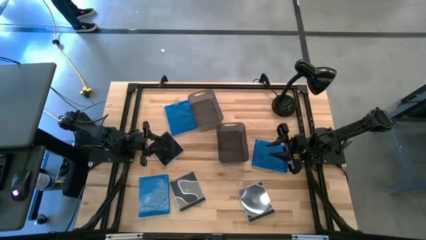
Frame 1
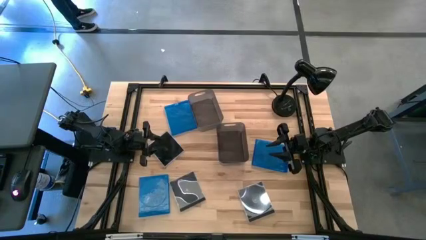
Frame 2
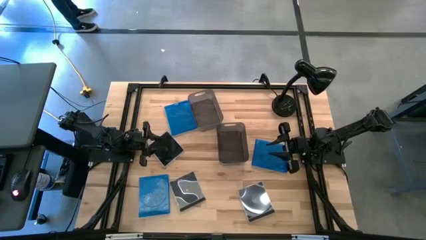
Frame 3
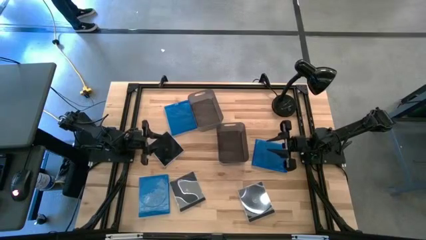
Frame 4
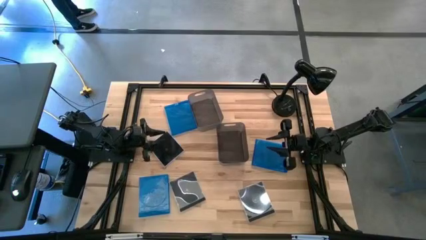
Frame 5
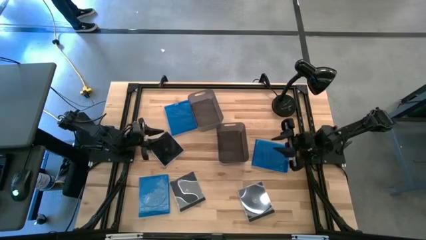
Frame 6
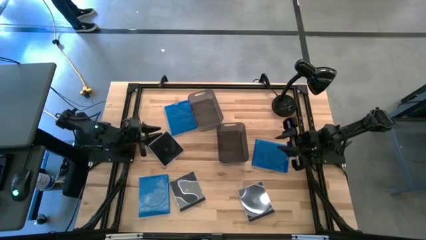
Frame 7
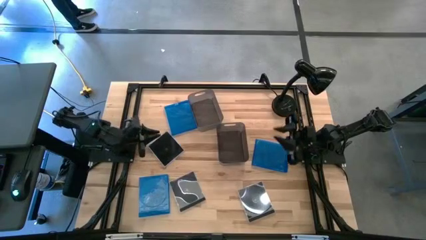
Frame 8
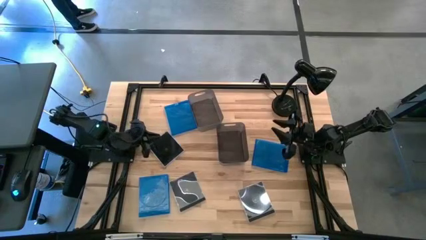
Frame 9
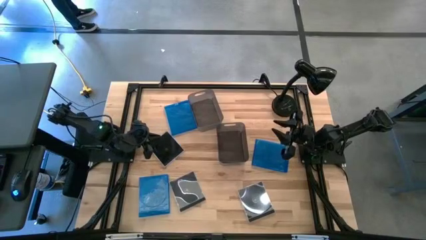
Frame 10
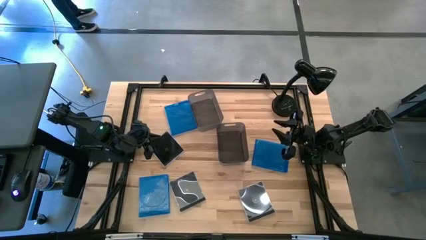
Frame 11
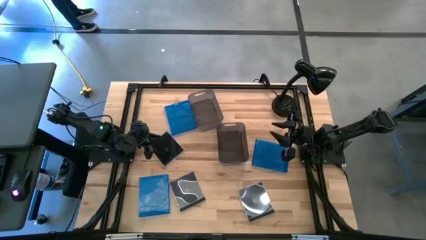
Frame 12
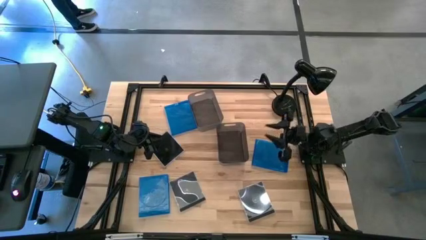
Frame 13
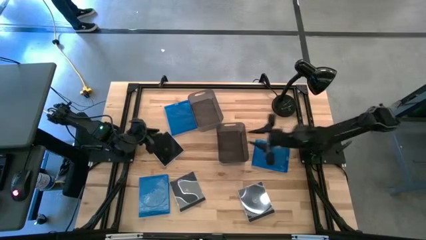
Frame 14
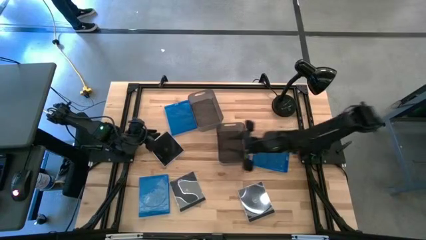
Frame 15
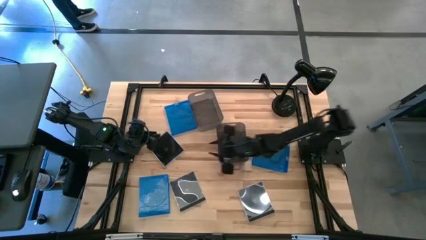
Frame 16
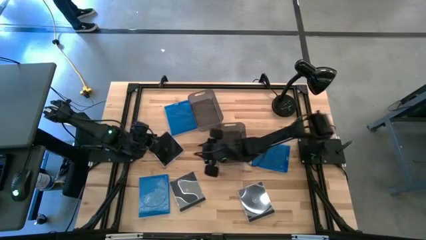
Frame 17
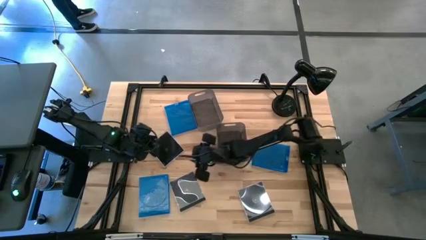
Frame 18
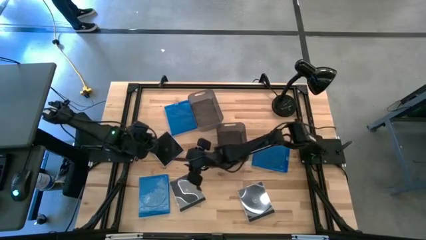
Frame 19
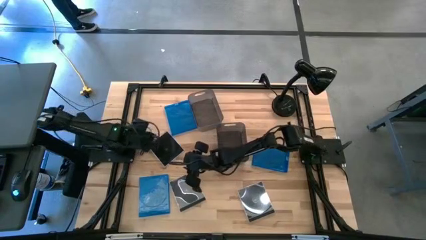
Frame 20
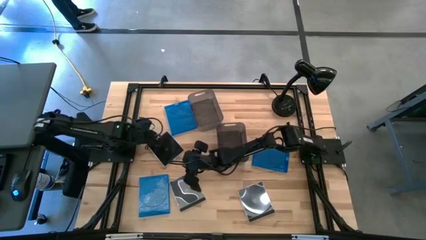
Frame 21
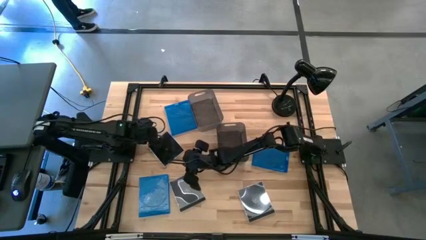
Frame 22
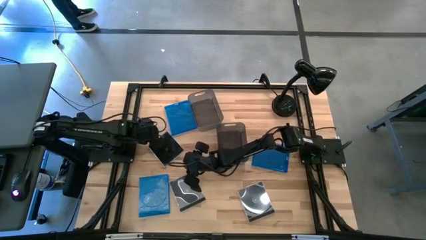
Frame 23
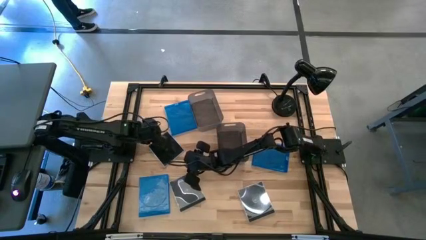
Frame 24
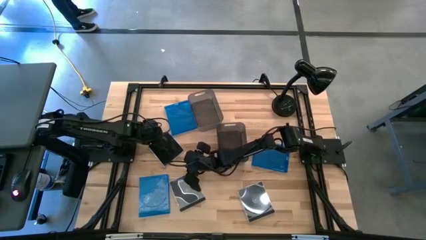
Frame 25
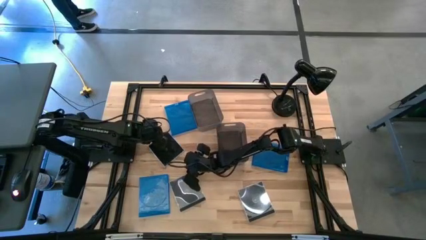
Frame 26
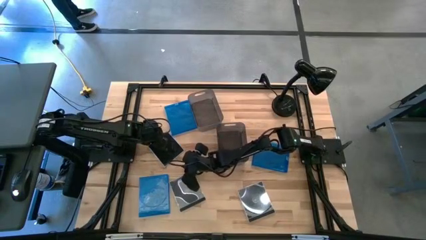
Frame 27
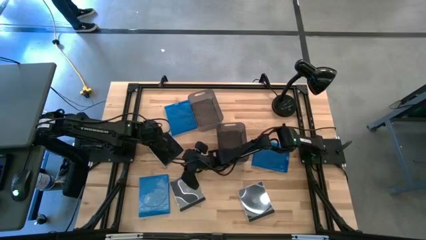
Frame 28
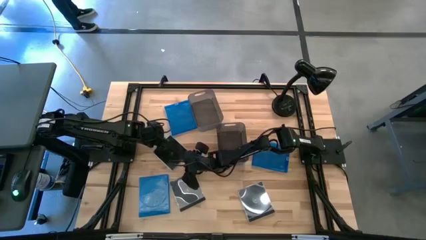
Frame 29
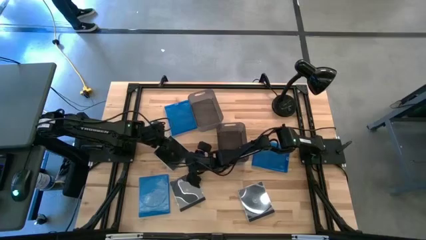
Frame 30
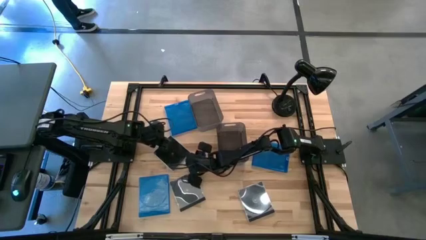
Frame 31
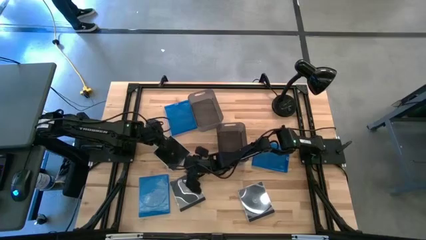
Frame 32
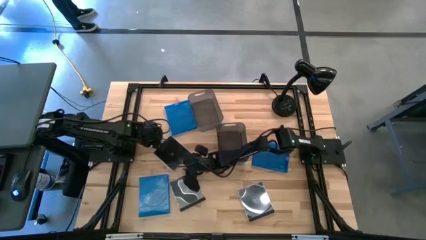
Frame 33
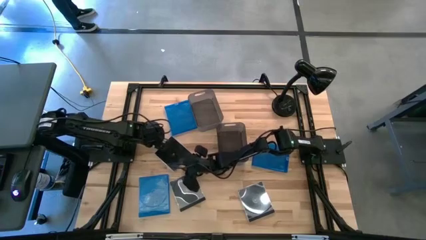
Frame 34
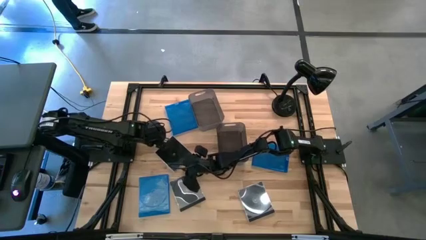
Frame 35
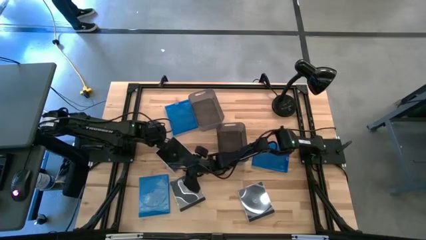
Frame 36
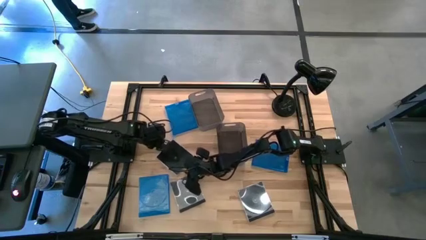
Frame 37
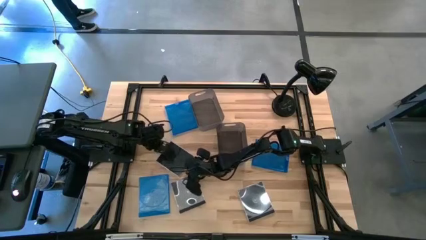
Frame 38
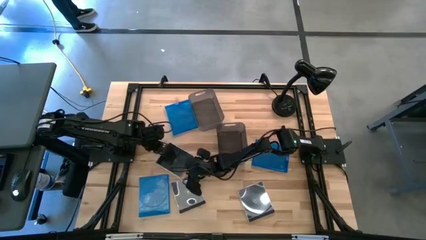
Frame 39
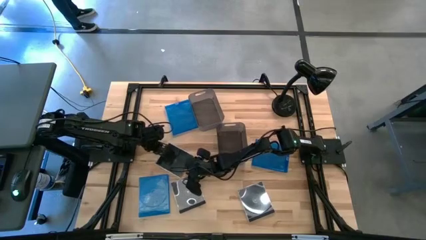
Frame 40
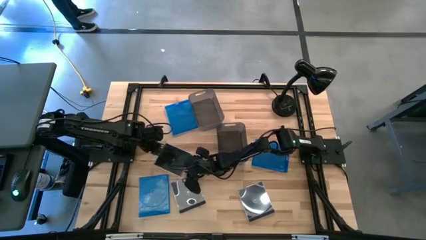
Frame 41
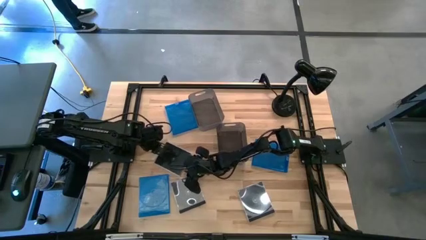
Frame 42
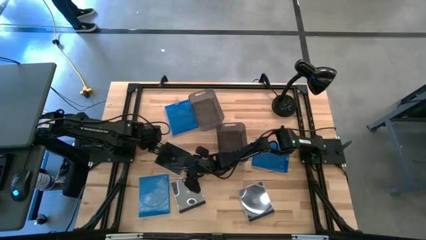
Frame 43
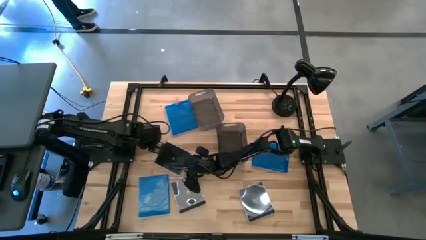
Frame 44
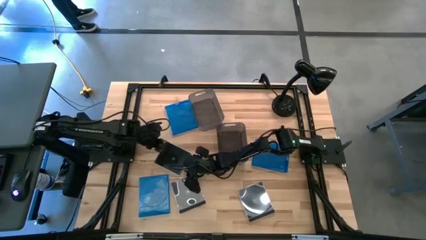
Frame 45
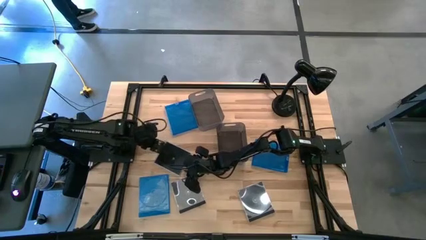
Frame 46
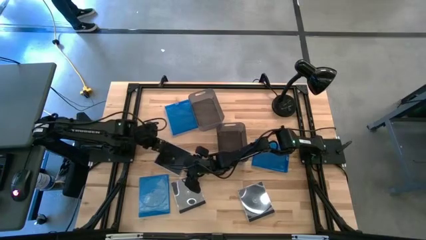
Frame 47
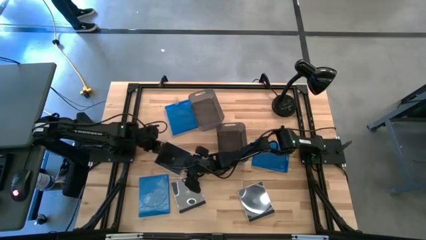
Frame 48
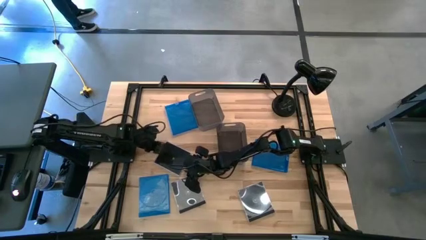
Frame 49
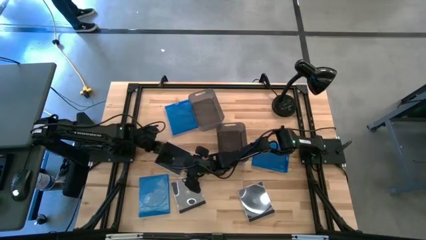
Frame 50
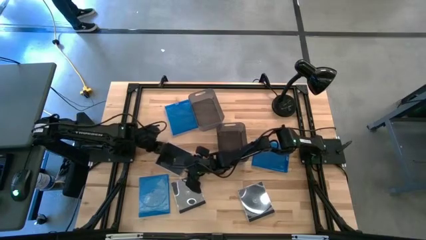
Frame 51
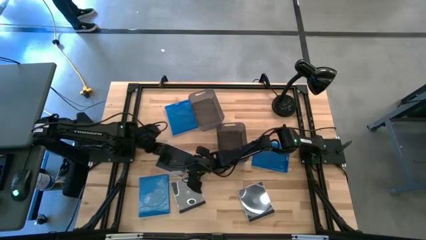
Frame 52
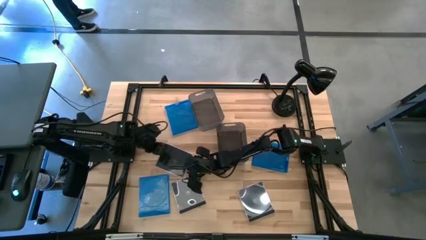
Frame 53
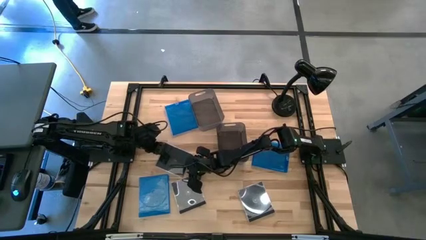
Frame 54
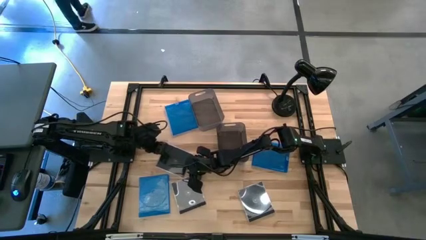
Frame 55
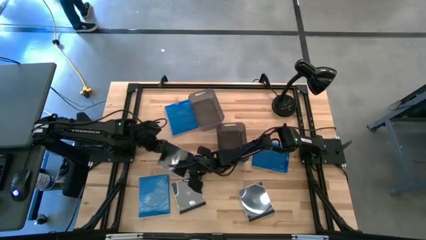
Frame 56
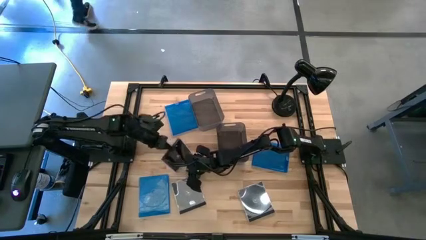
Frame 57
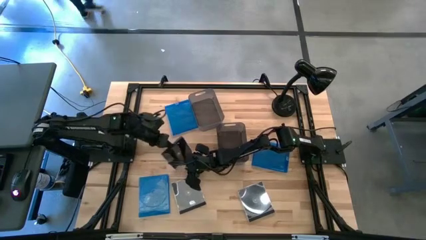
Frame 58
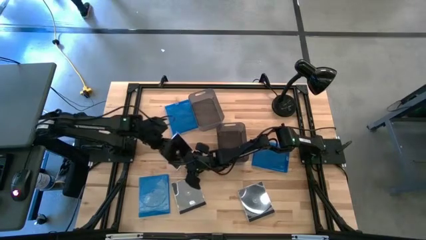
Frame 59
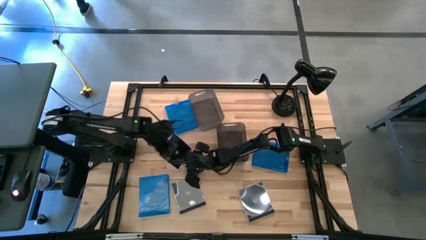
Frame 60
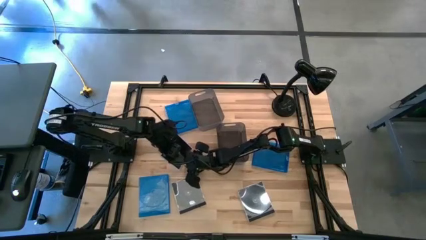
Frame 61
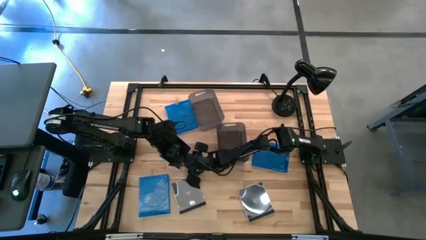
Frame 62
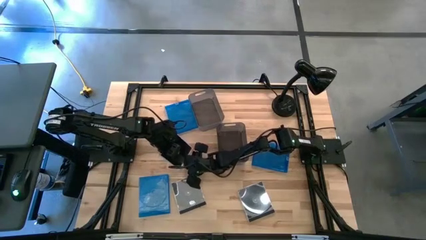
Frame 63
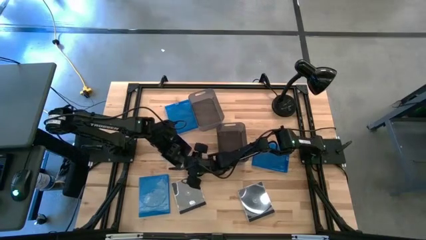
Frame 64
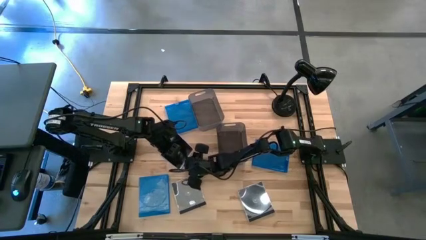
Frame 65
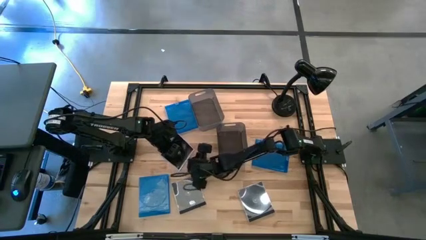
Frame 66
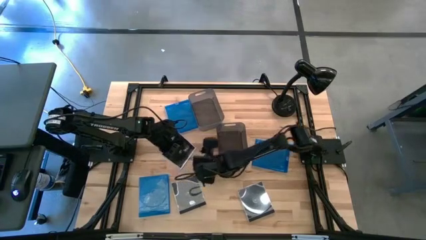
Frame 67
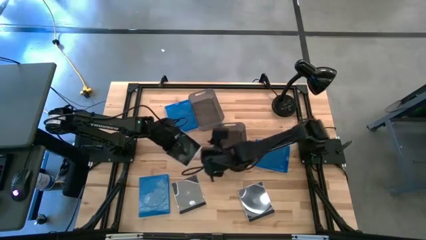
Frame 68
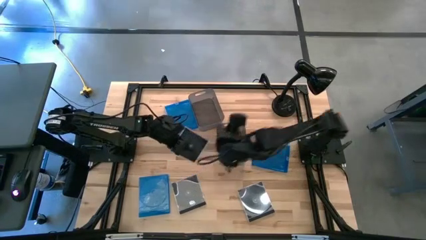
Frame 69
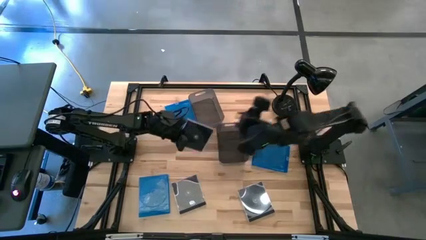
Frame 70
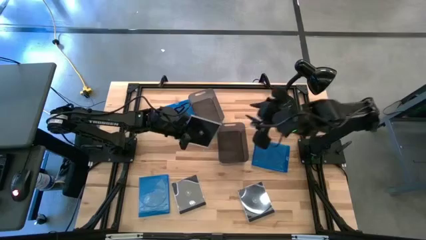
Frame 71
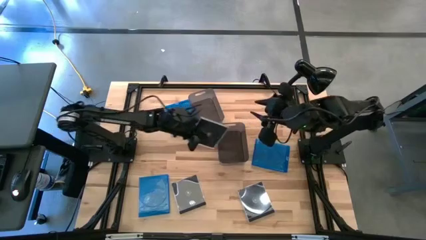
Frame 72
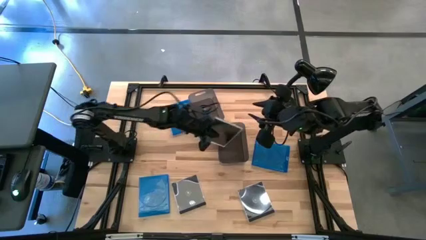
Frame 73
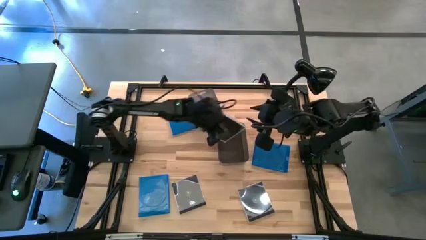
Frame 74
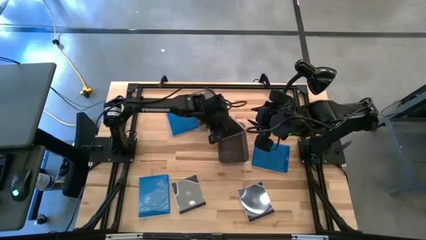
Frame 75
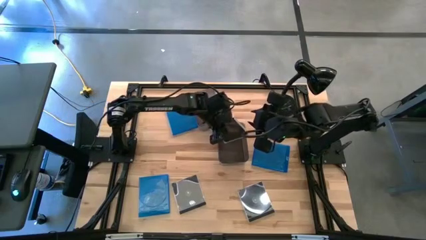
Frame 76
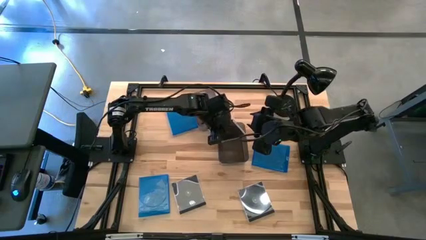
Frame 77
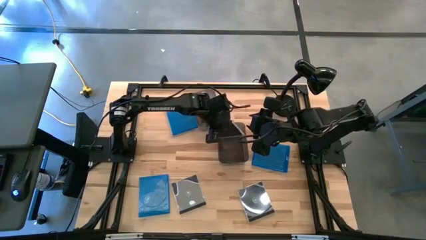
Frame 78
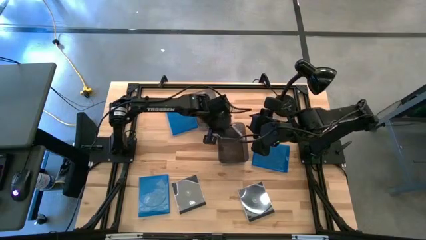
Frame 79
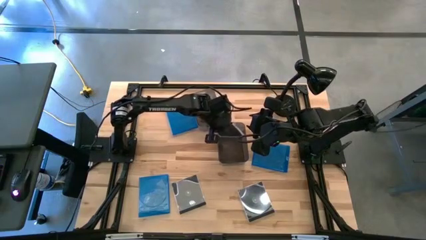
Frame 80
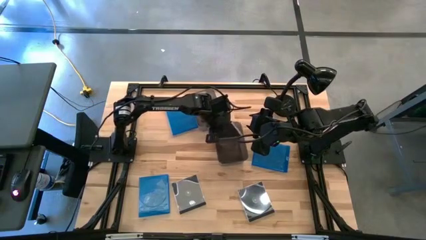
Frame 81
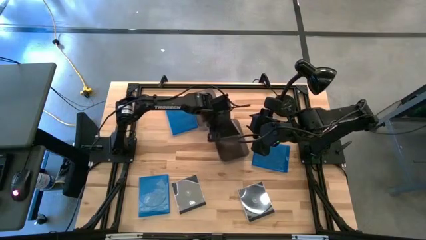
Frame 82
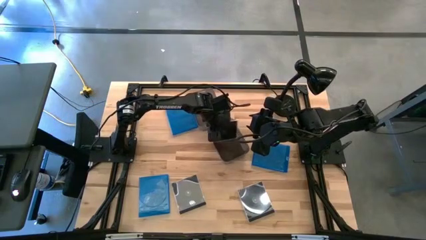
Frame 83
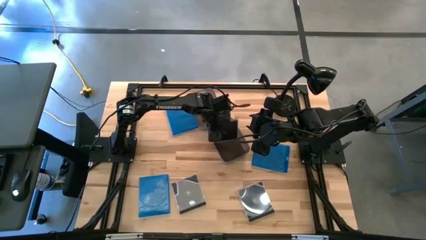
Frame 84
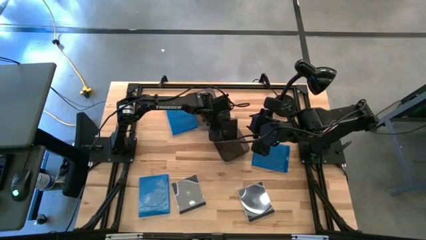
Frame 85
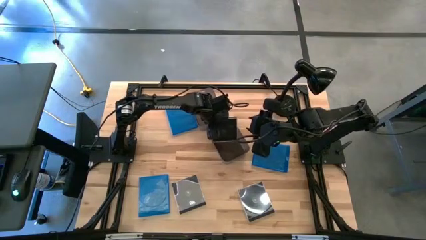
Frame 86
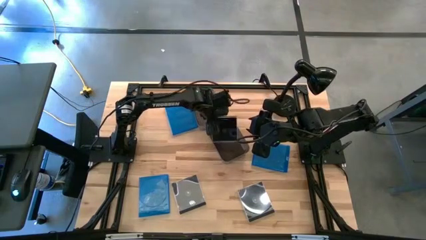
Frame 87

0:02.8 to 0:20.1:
Task: Pick & place jewel cases by type
Put the top left black CD case into the bottom black bin
